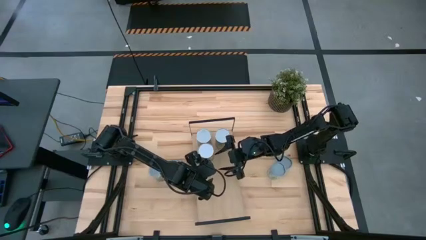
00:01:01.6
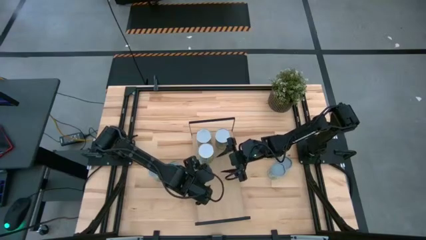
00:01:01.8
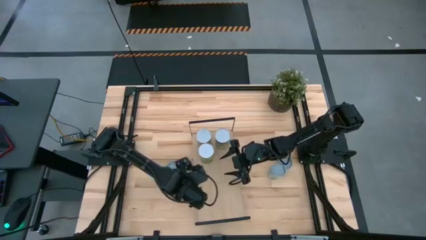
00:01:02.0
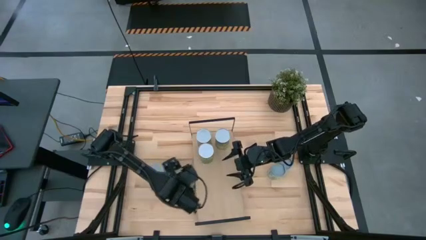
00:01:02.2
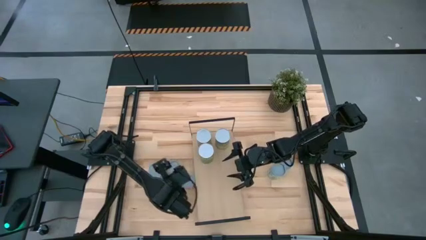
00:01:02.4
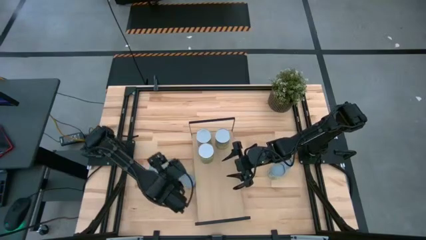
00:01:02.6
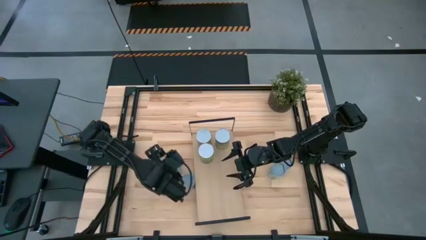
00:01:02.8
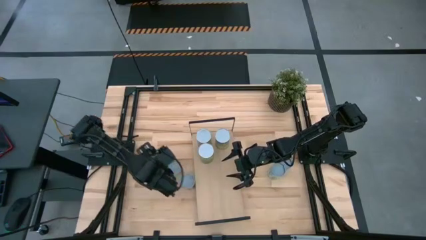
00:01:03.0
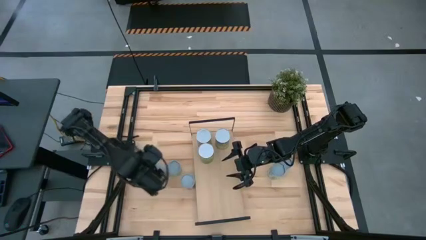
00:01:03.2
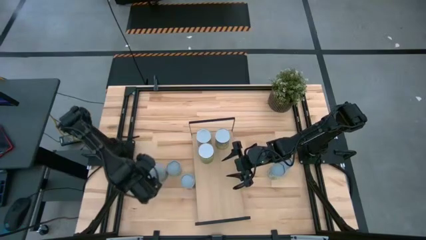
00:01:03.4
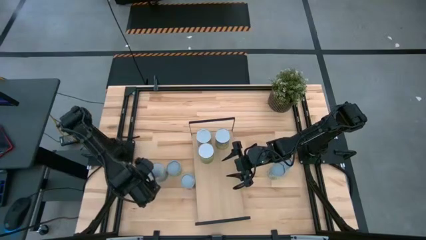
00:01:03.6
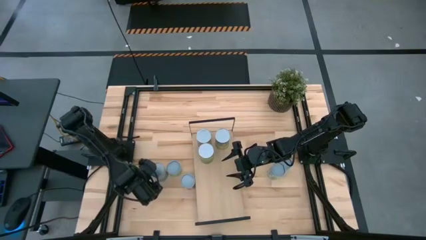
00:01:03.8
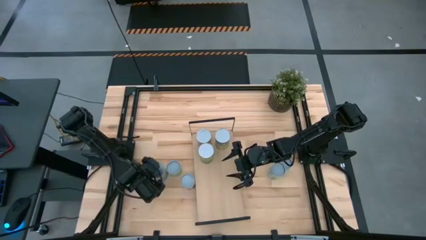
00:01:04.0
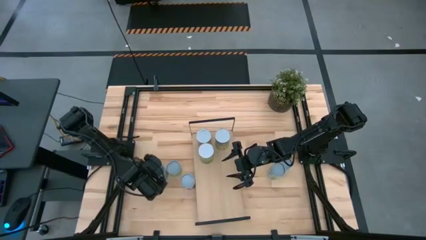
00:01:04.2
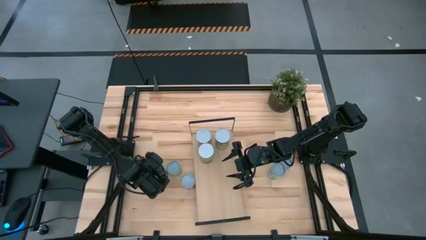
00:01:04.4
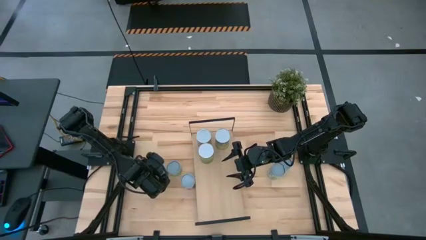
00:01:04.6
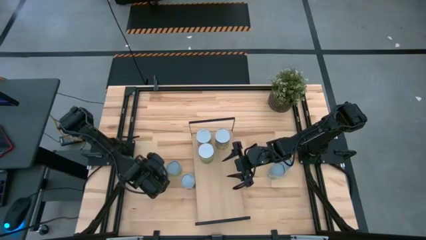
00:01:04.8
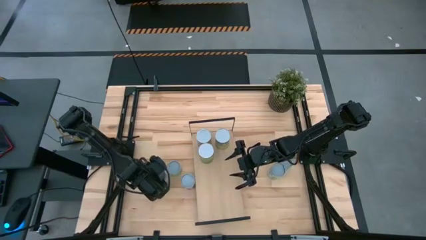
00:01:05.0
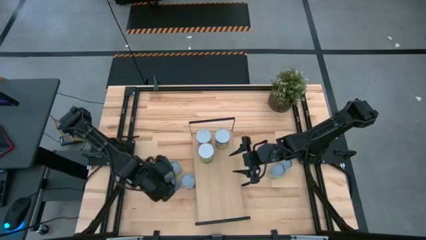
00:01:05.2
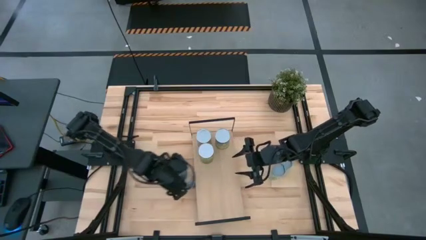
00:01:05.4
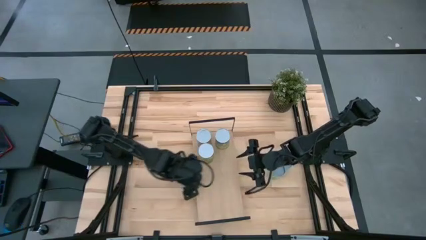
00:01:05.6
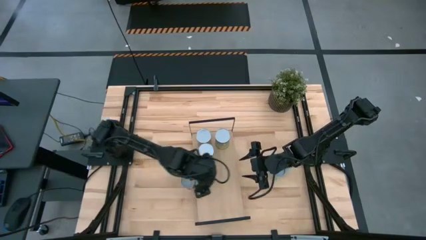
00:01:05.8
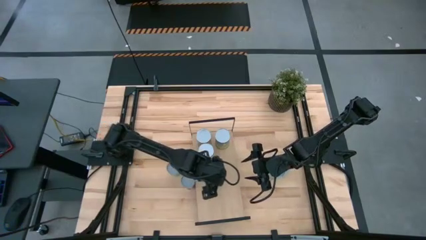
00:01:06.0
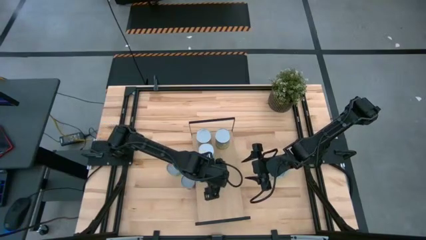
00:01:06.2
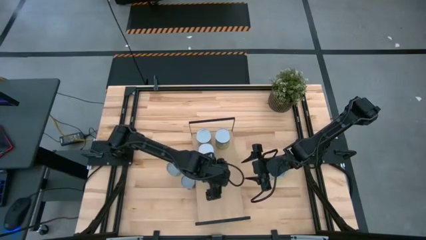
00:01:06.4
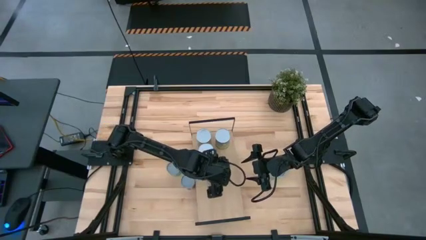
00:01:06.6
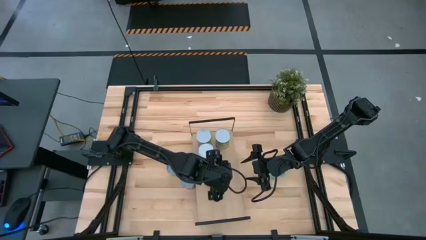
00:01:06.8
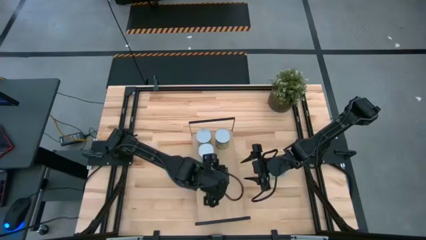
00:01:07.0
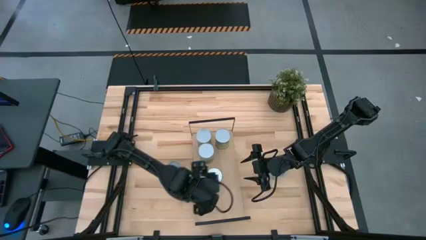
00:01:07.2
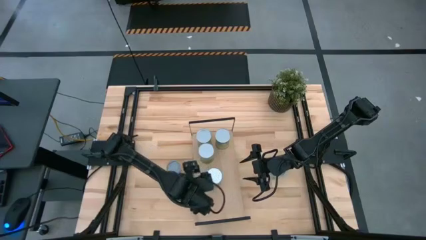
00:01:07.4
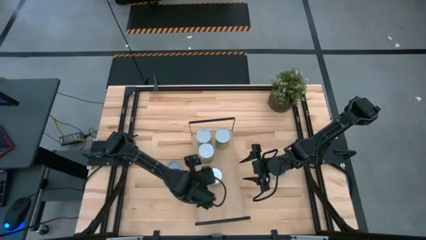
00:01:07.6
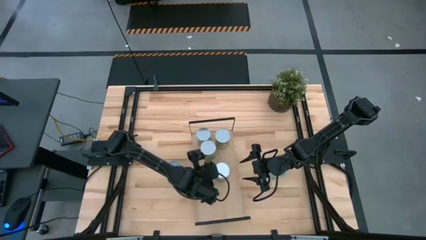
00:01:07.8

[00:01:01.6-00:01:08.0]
Task: Pick and place cans onto a shelf
Put the large canned peas on the shelf

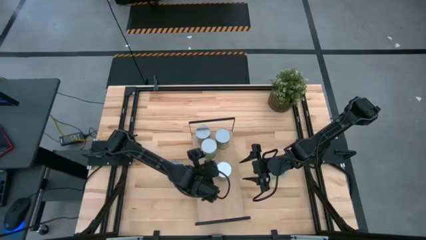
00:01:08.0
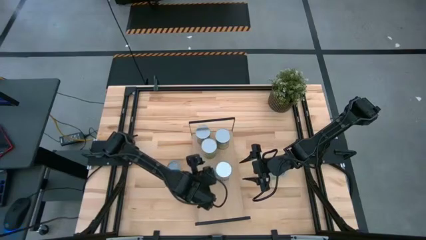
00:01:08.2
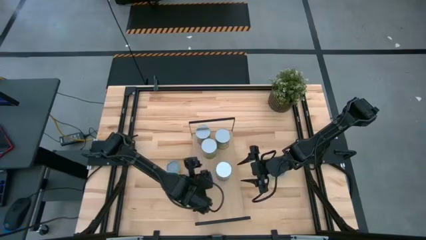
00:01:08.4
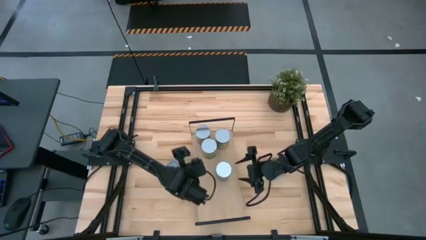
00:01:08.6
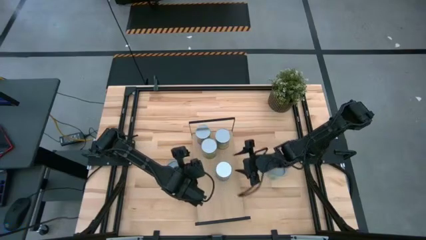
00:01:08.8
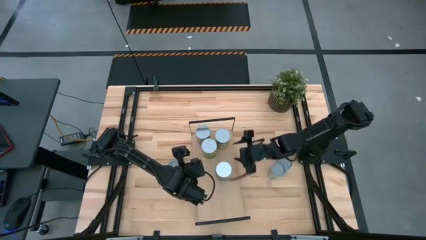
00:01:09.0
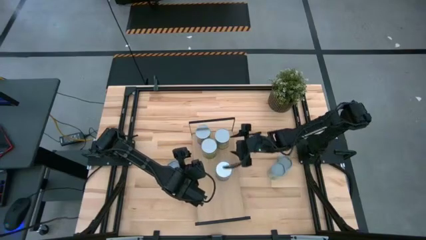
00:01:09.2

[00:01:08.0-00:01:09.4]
Adjust the large canned carrots on the shelf

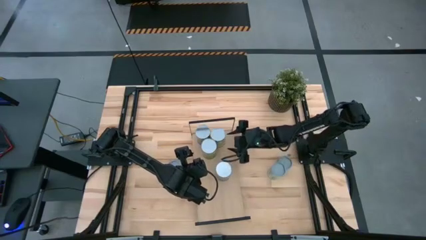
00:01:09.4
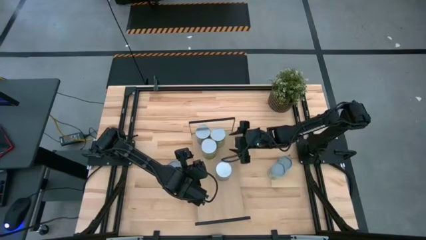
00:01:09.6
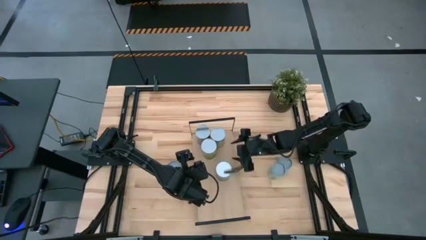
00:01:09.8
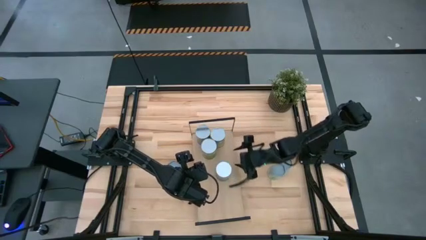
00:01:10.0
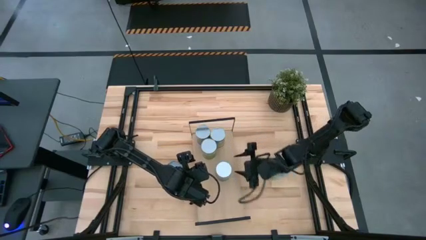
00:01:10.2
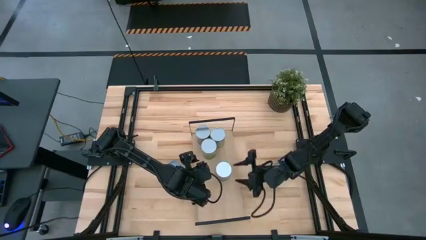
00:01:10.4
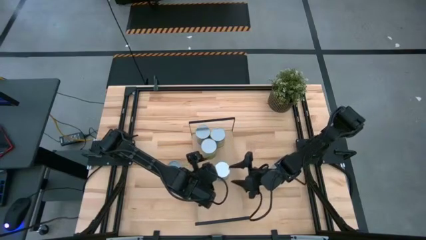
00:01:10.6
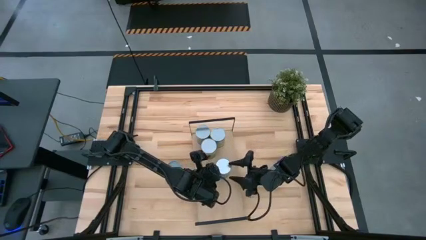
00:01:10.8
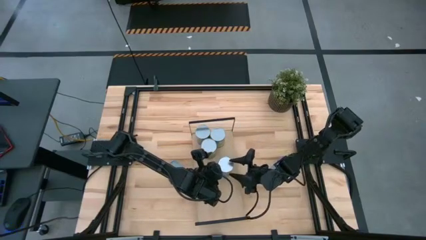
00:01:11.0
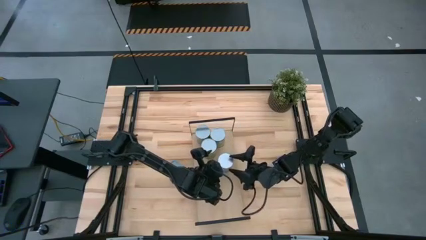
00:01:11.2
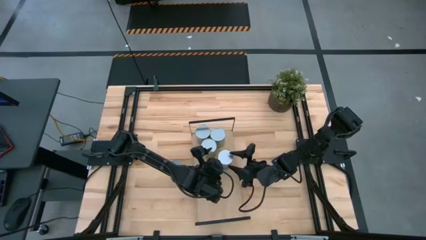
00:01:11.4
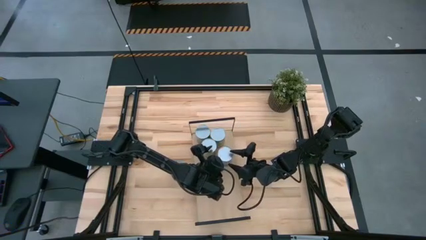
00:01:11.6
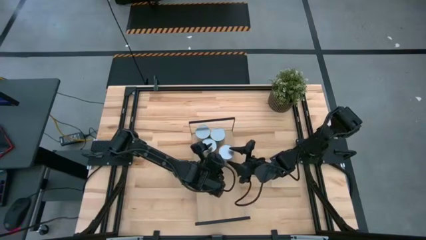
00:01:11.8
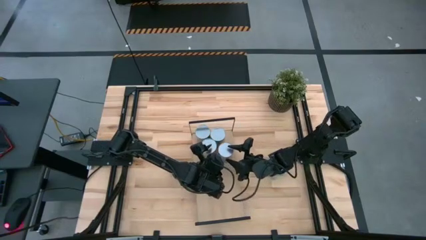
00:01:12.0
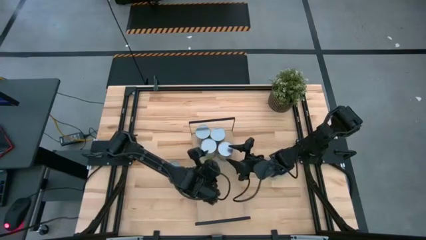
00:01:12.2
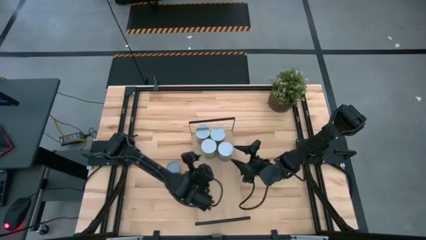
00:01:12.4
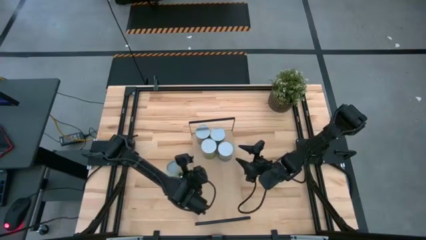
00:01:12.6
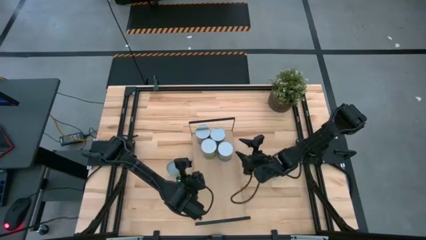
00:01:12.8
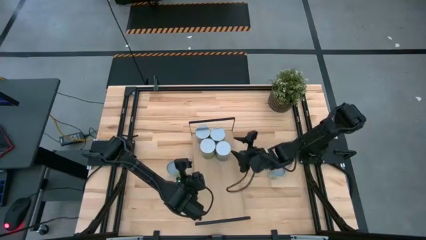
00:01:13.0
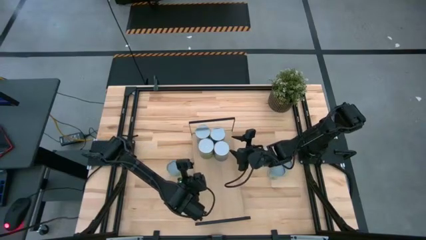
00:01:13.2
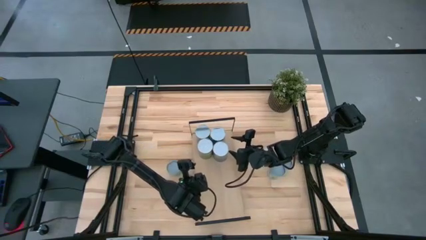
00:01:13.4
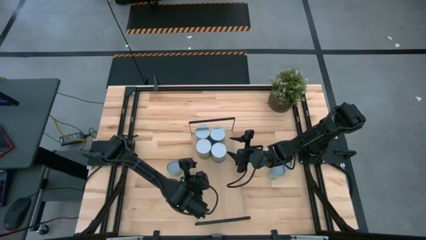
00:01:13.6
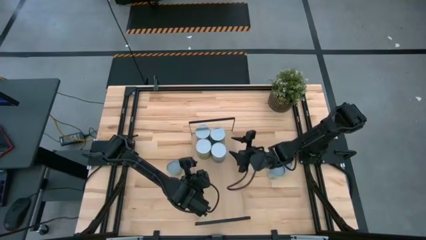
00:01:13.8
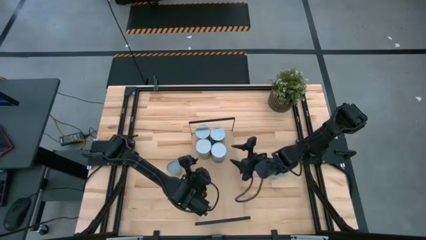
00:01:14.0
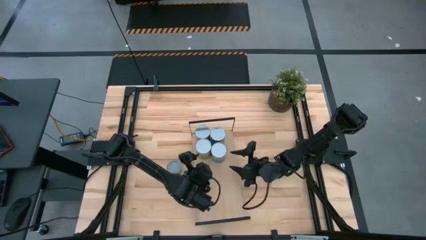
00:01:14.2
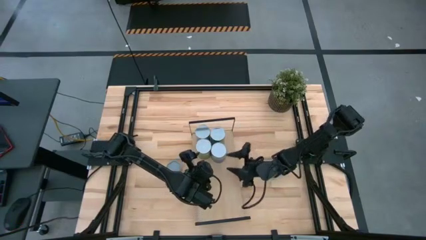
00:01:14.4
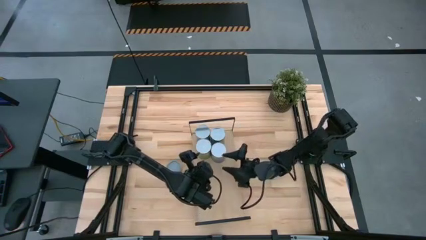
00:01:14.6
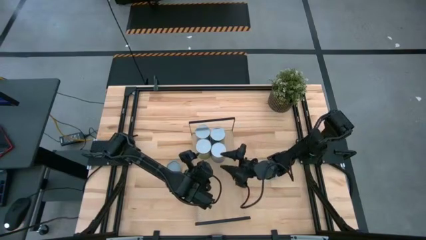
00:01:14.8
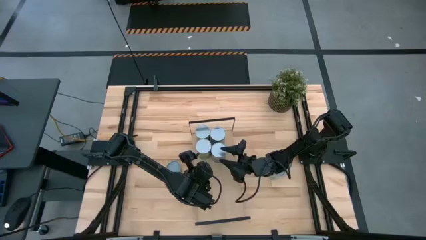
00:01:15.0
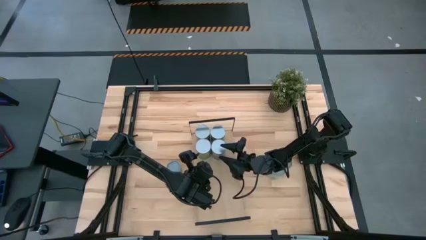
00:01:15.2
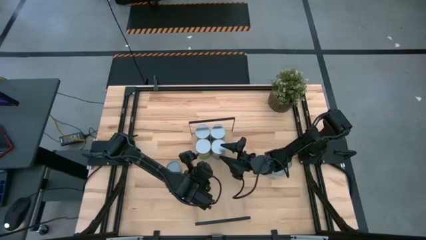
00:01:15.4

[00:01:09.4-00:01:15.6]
Adjust the large canned peas on the shelf
